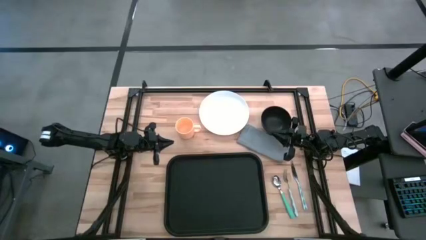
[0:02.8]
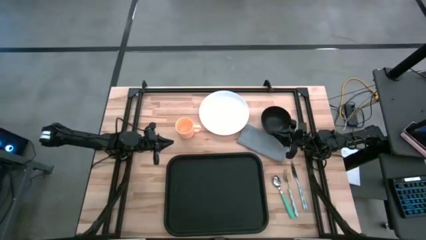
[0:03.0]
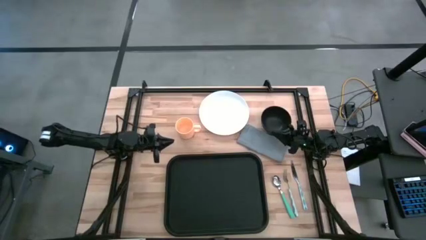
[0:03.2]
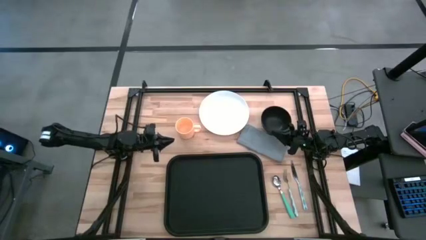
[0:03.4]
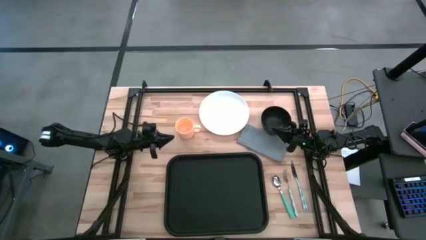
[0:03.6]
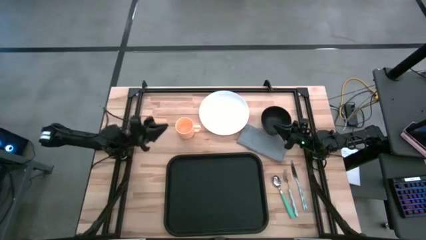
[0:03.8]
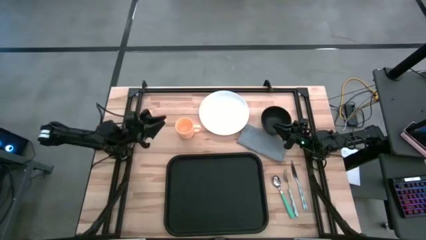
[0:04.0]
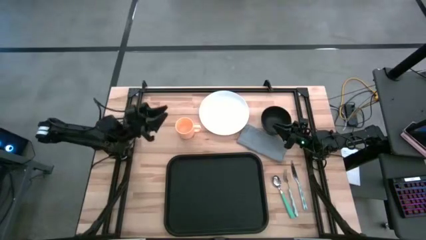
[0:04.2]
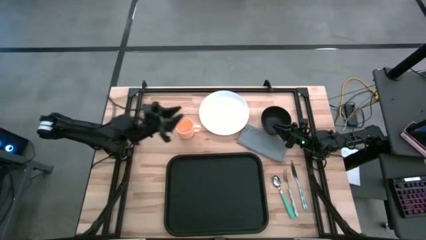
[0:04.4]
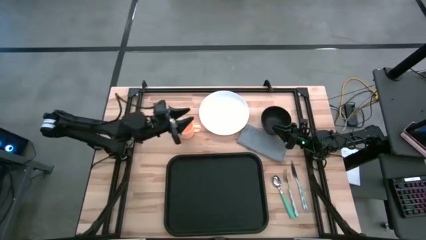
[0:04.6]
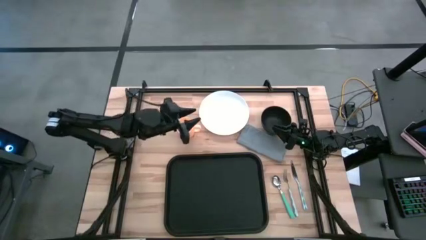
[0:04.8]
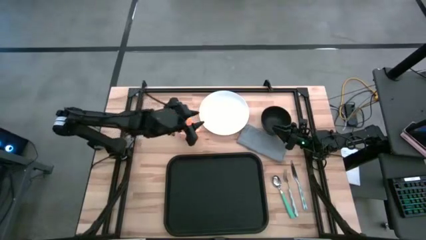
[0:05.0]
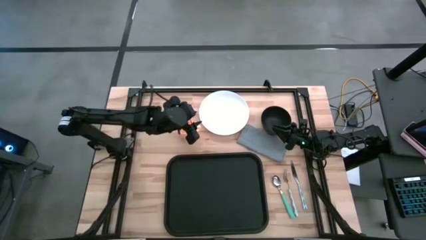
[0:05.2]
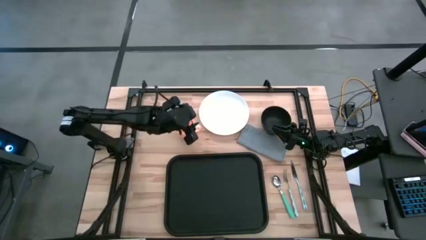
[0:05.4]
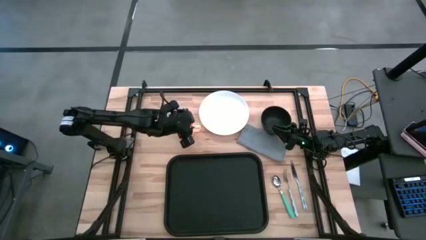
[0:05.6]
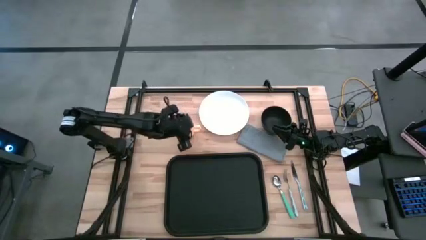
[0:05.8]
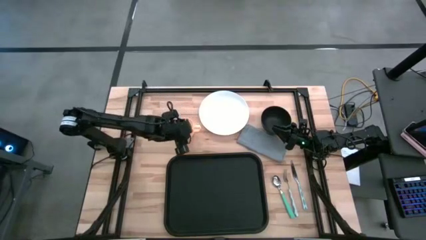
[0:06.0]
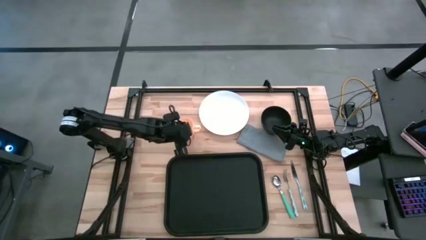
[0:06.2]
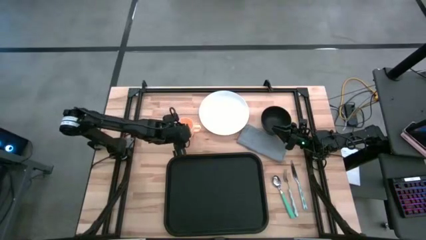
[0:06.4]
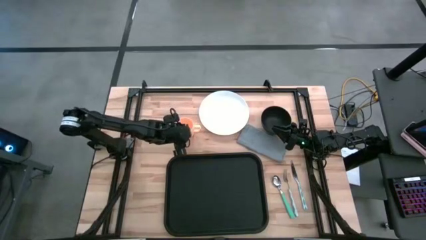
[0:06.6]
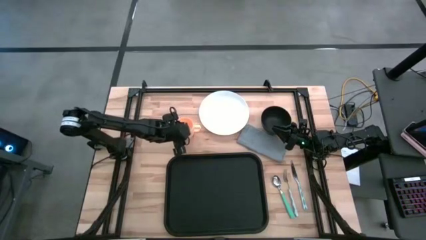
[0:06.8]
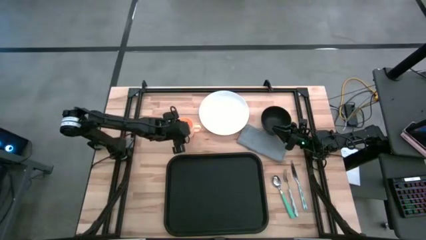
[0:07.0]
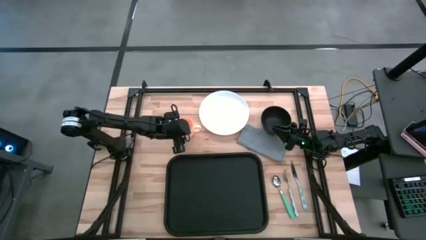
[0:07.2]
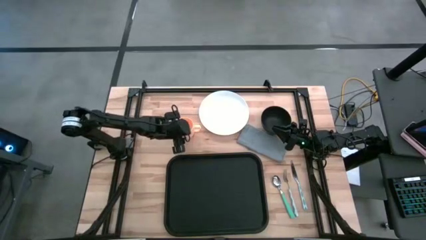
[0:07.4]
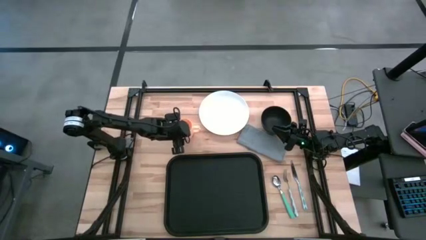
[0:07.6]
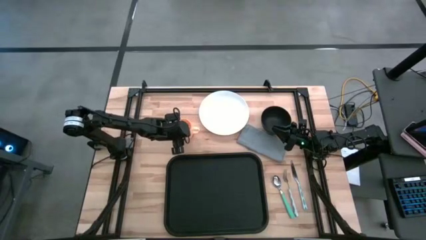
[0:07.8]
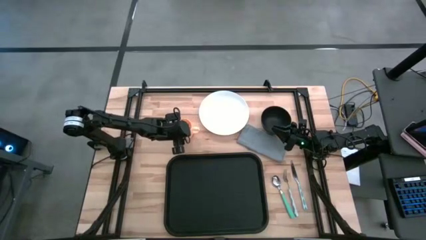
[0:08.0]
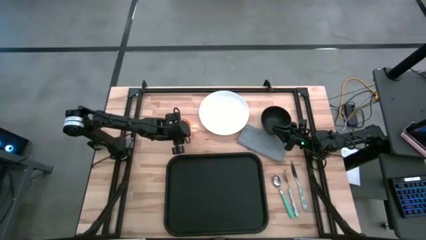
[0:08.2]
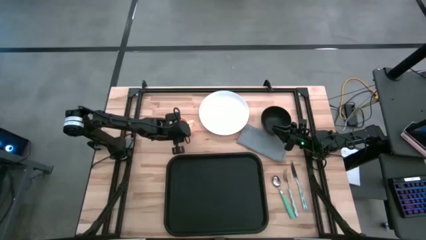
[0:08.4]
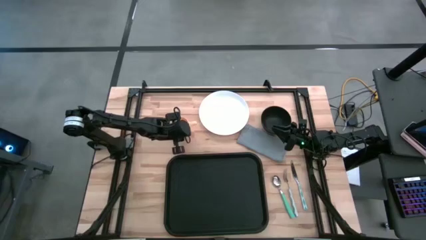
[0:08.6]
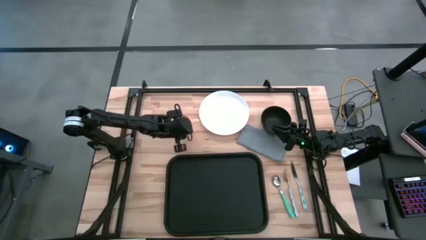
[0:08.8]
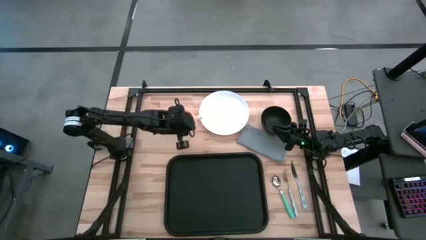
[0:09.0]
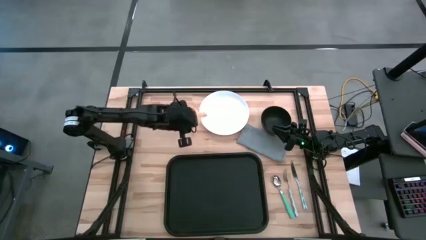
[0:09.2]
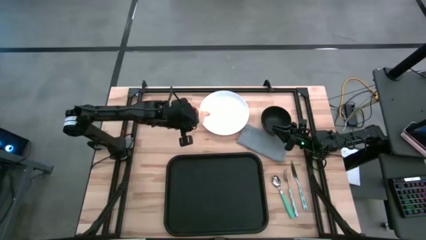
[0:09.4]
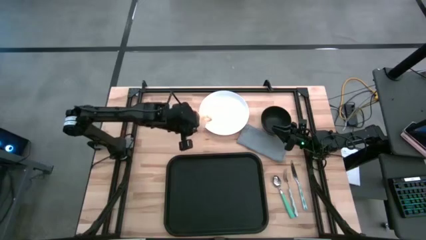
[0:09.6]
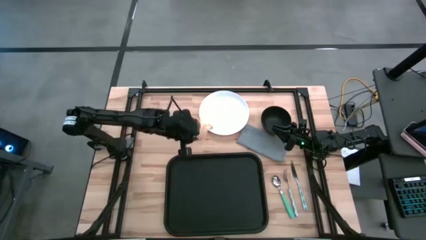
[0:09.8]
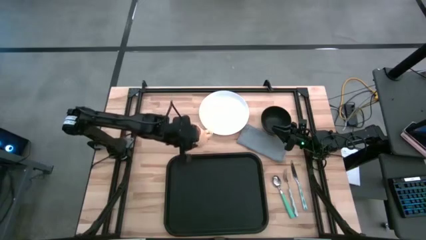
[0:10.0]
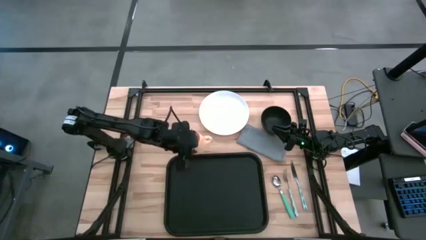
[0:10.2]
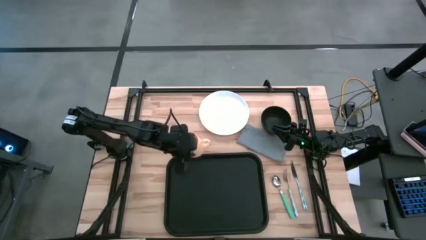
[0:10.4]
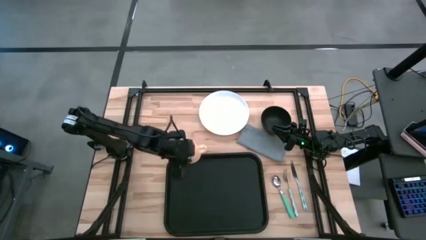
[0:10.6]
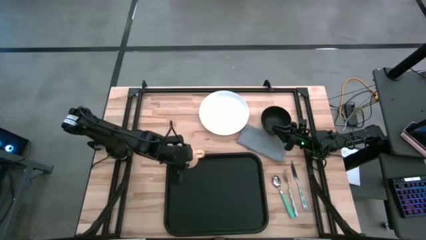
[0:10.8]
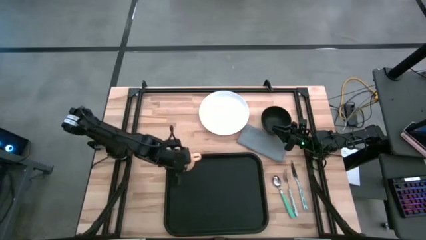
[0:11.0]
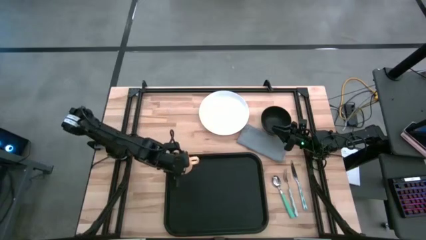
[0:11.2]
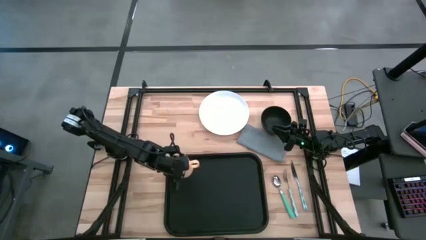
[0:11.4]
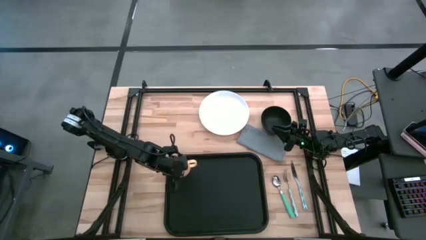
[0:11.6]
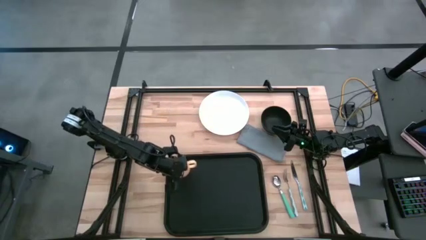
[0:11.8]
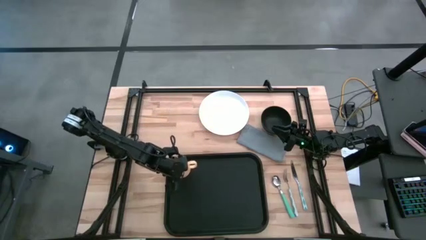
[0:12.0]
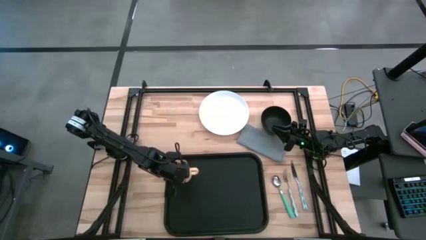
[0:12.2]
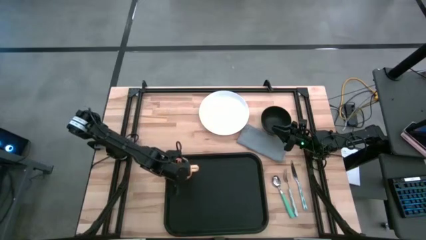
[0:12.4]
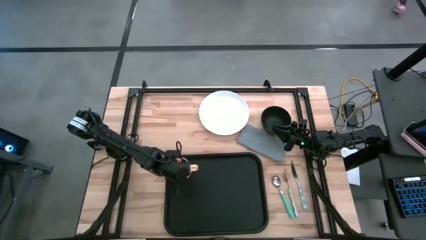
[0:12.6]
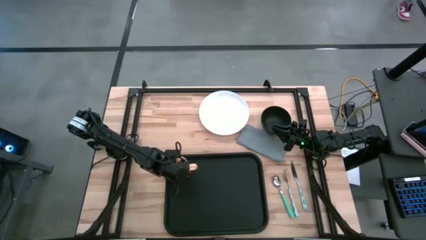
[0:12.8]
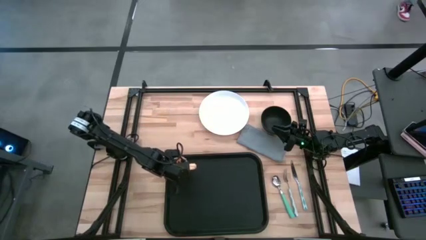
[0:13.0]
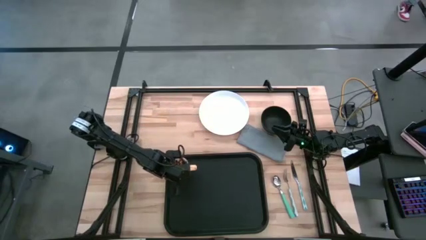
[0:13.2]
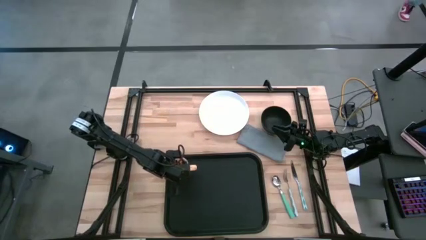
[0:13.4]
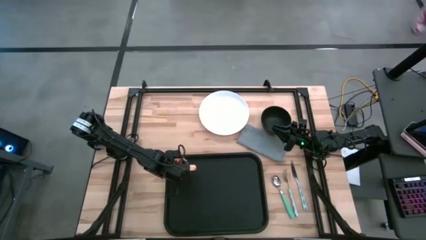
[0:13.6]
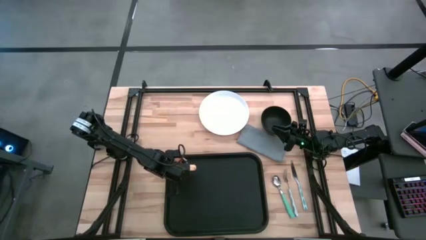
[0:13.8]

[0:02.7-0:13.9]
Task: Set up tray
Put the yellow mug on the black tray

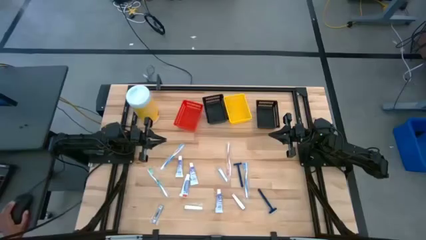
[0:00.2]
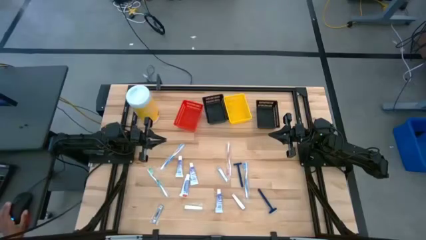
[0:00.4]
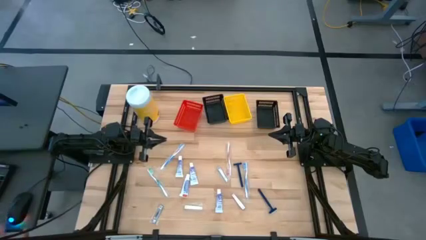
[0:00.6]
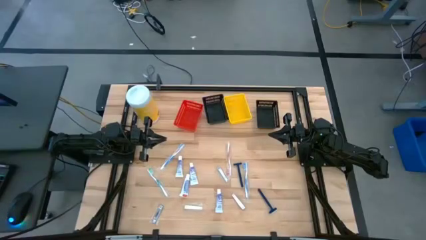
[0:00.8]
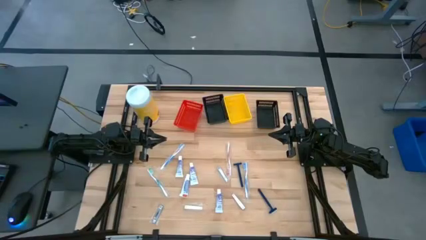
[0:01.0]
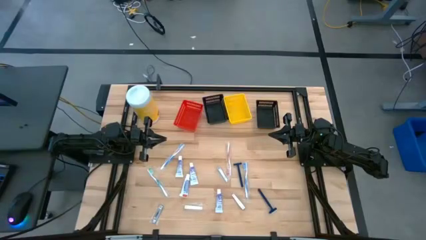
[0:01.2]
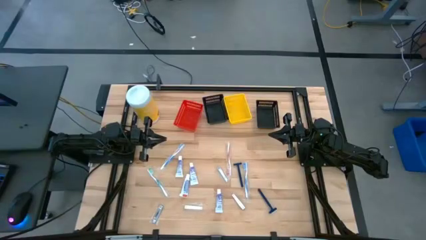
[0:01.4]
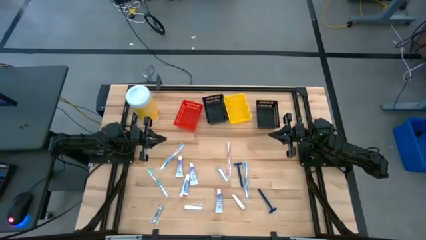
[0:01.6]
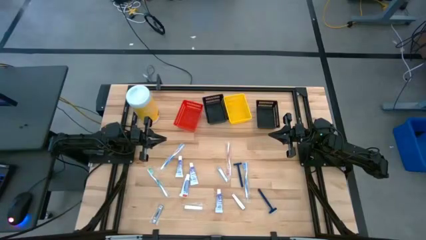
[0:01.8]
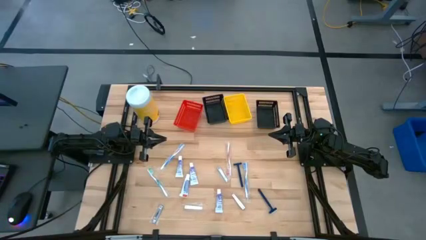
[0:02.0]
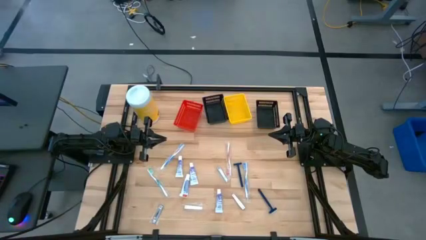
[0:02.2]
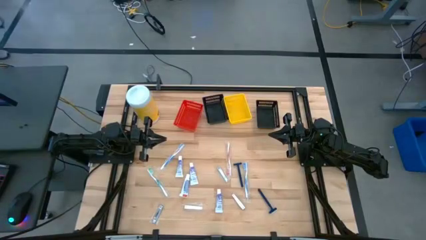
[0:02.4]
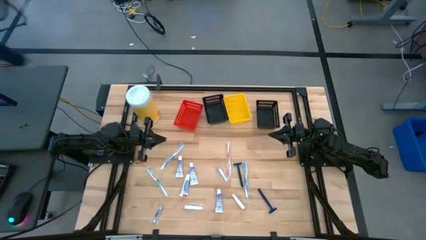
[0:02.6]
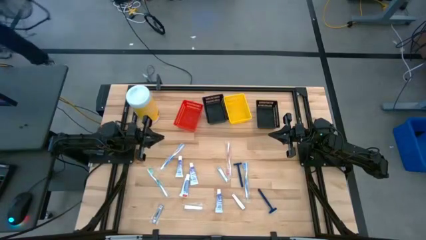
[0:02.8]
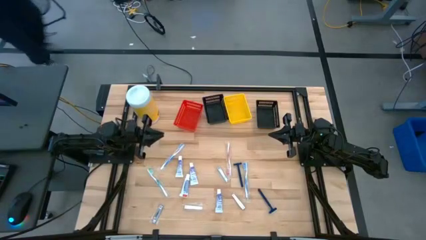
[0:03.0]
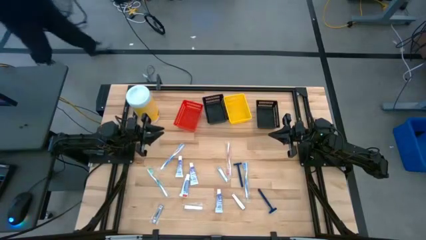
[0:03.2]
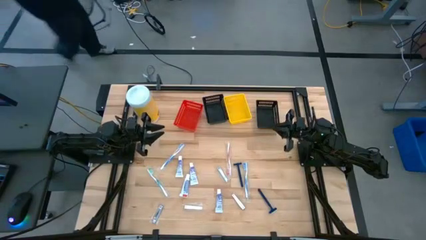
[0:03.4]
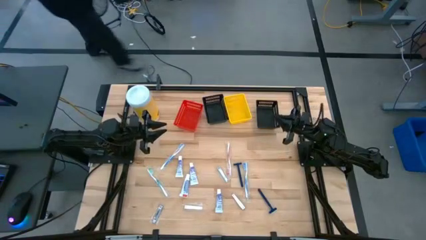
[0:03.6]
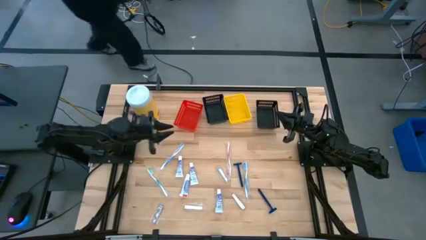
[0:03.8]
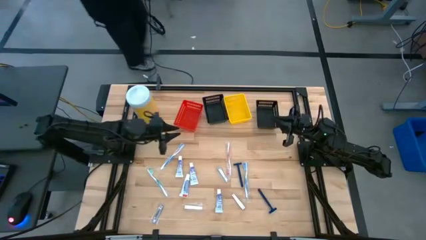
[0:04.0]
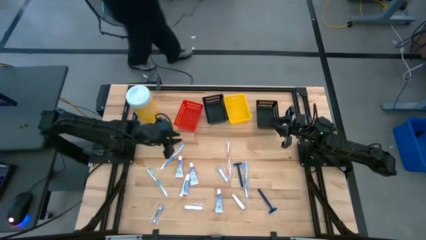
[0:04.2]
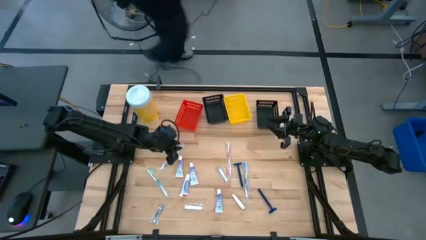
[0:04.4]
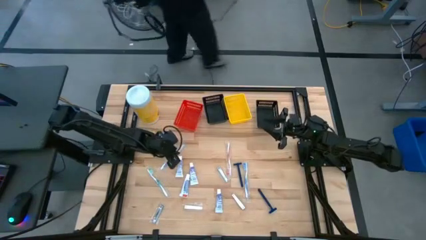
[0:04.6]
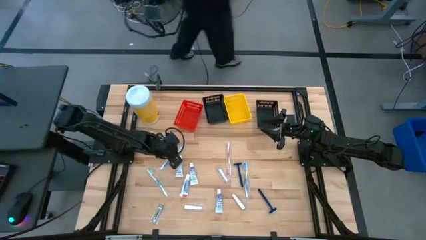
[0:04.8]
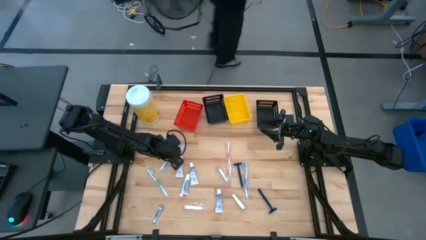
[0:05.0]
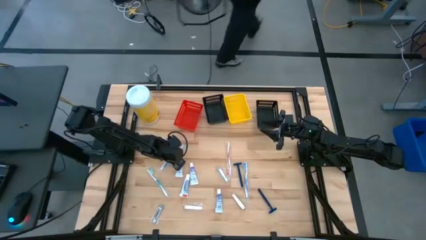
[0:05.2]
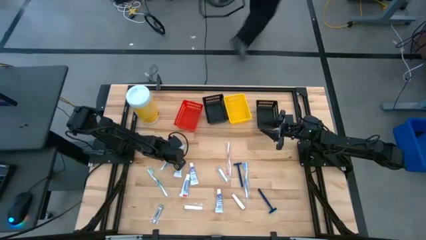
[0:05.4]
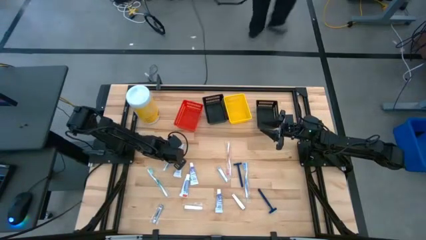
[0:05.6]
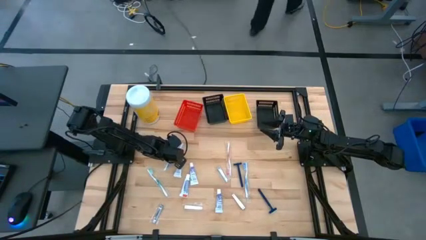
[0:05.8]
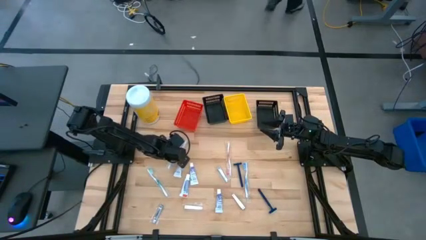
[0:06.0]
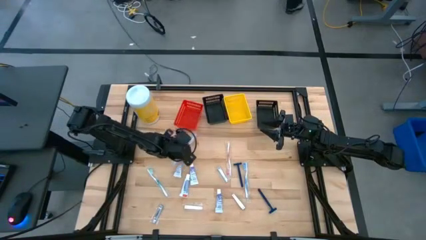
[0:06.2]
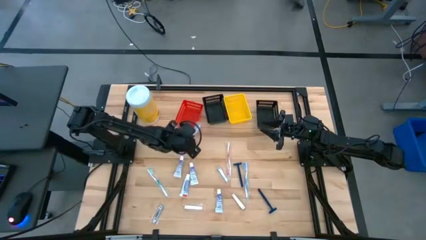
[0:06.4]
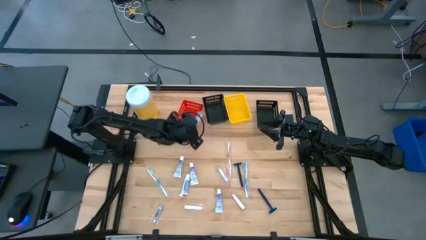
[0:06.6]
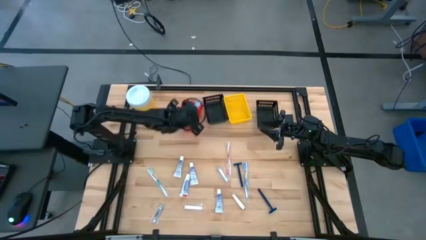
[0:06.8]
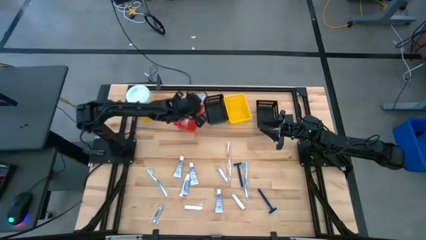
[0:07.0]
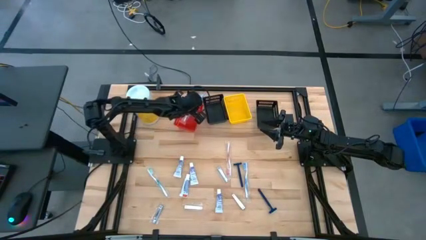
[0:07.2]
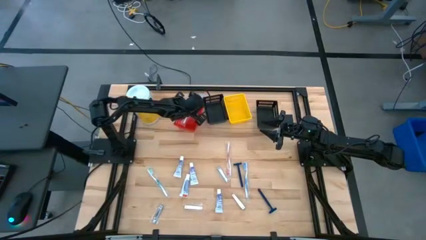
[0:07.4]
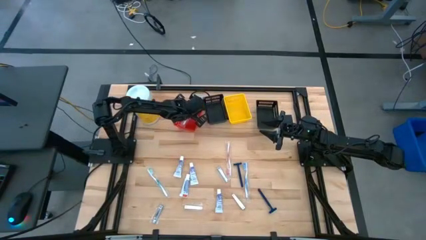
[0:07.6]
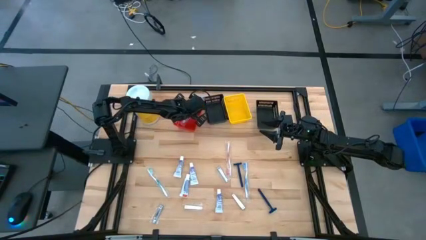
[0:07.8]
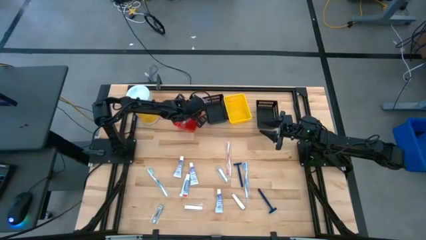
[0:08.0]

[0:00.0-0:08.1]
Task: Pick & Place Travel size toiletries
Put the blue toothbrush into the red bin
